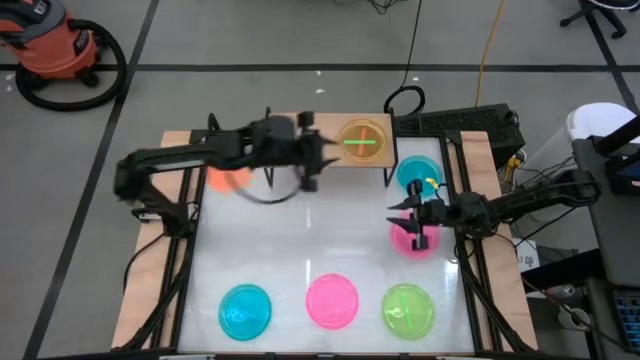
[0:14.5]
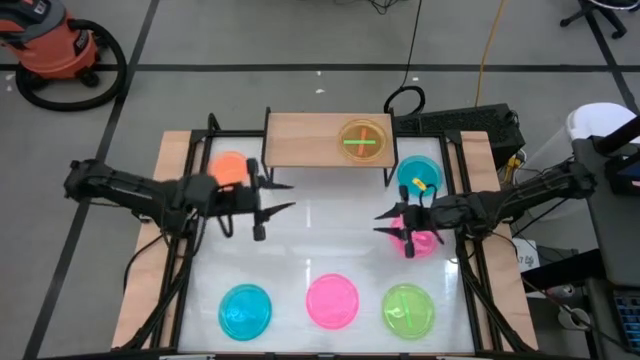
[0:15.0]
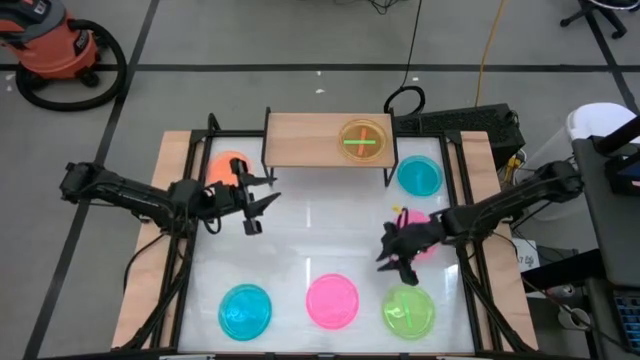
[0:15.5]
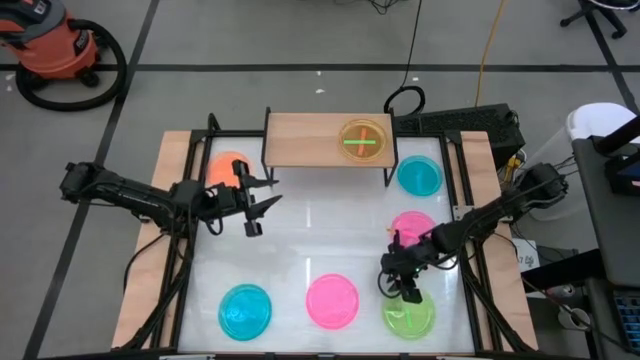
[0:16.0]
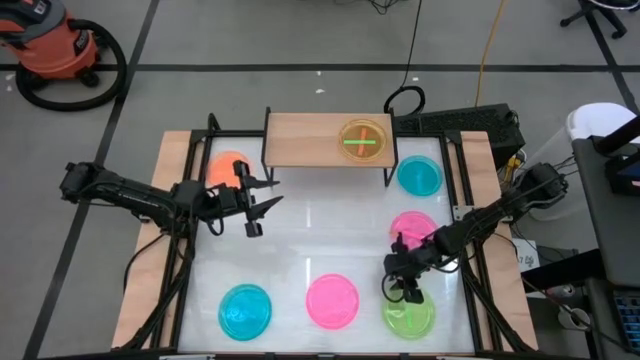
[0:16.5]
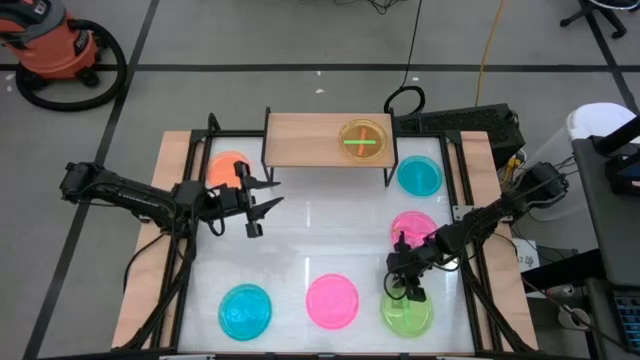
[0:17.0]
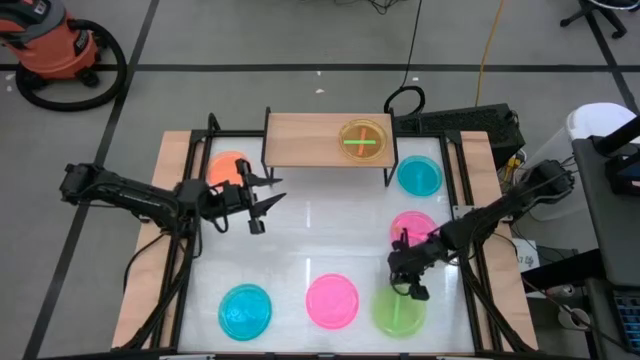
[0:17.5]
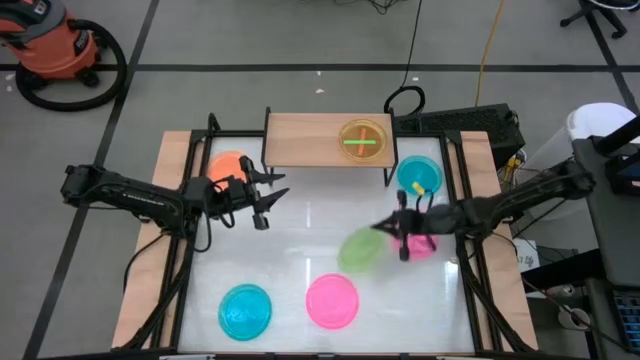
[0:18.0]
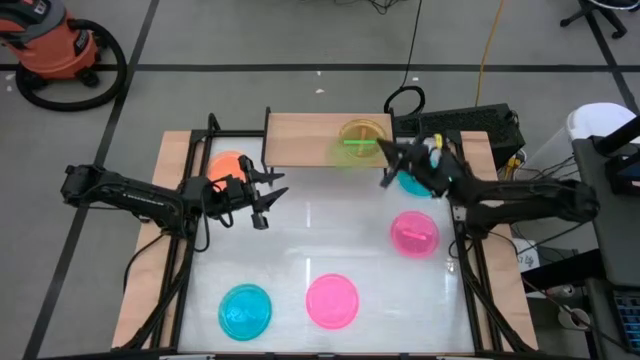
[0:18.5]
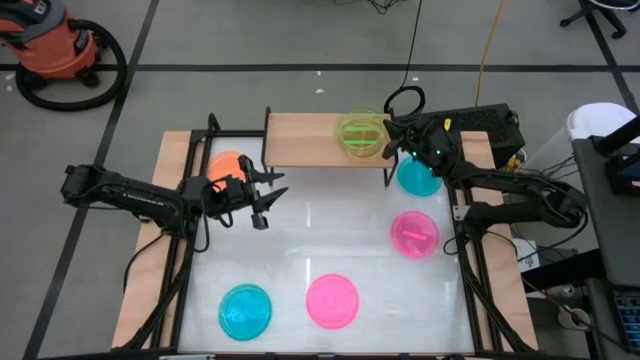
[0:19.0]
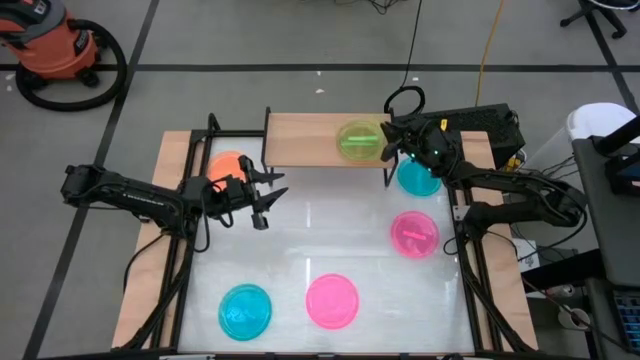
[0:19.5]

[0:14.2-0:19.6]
Task: Place and stack plates onto a shelf
Stack the green plate on top of the green plate on the shelf

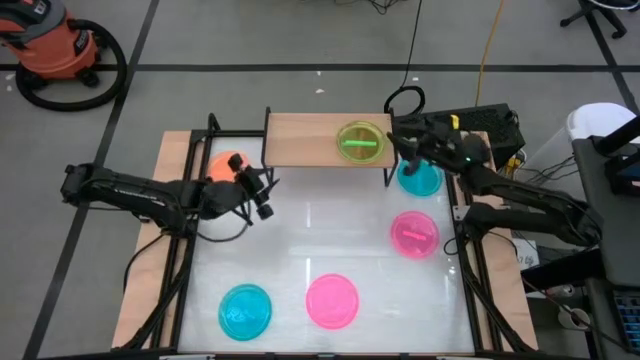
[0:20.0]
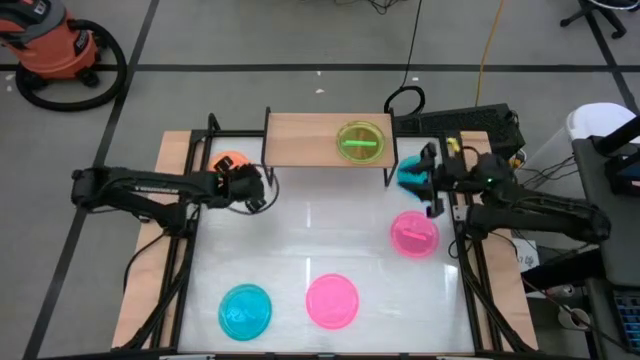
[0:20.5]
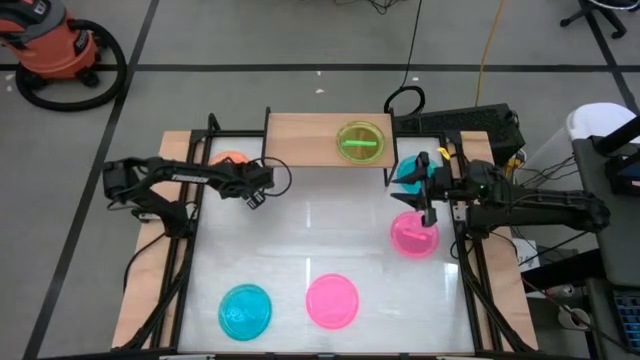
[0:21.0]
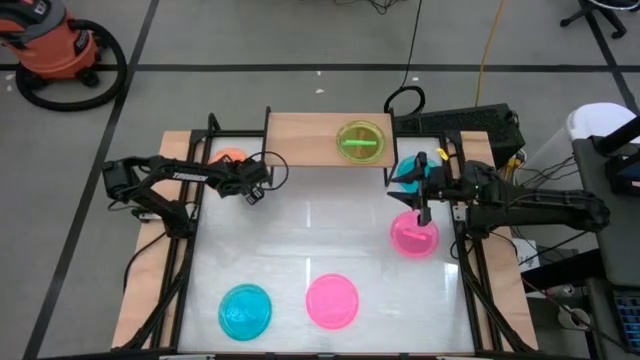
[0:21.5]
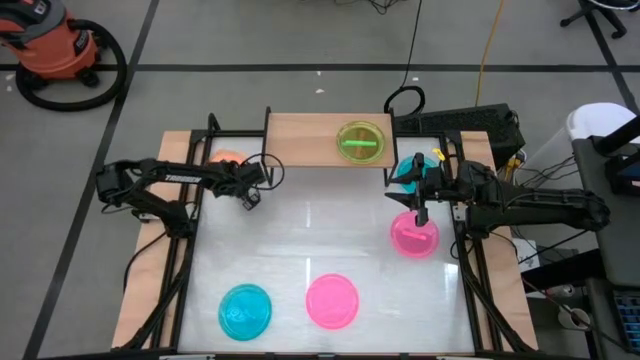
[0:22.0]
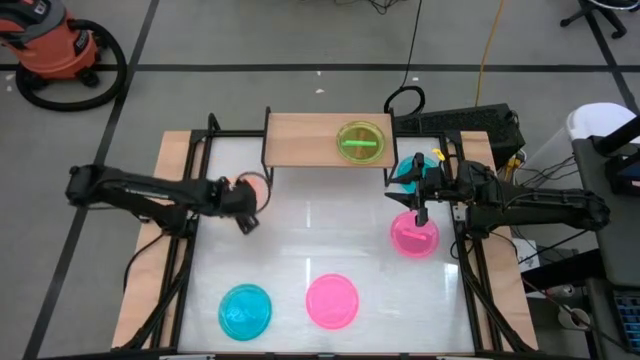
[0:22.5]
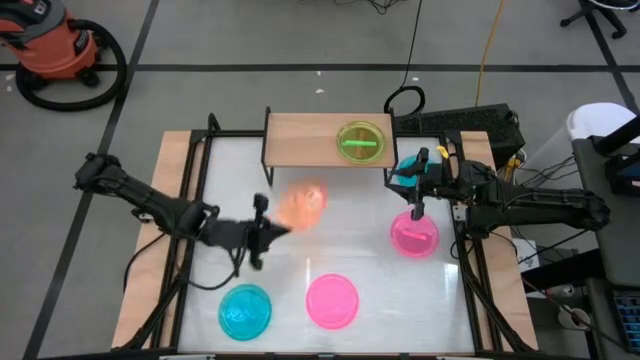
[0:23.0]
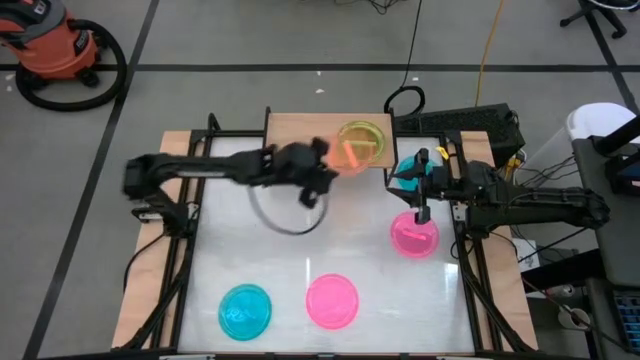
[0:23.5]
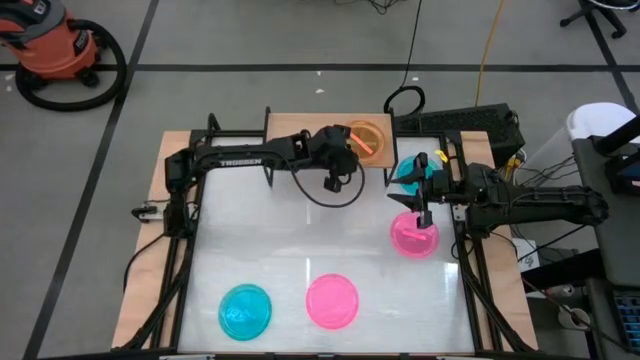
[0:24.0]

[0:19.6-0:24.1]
Stack the orange plate on top of the green plate on the shelf

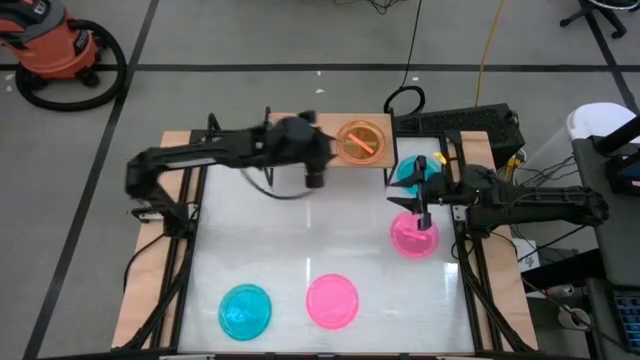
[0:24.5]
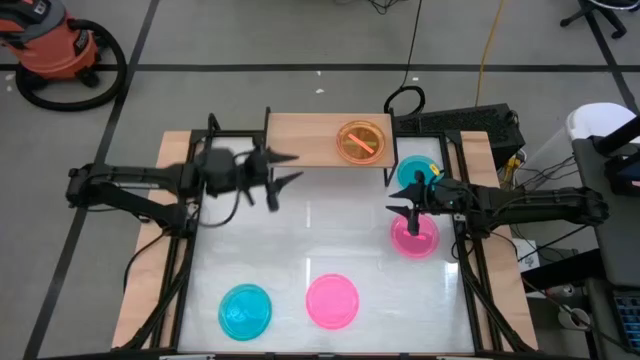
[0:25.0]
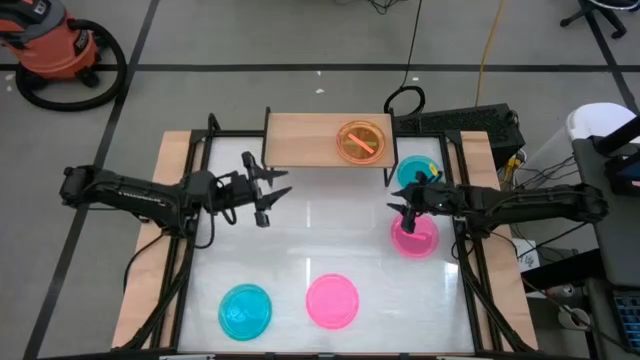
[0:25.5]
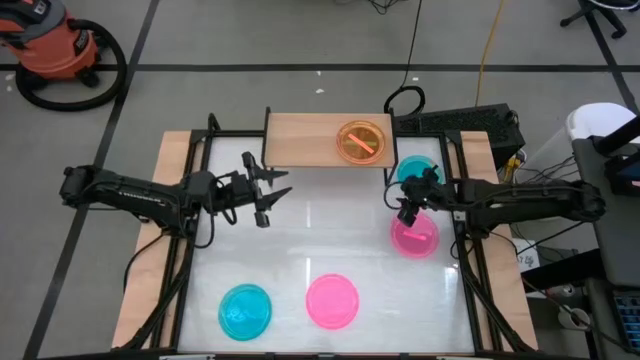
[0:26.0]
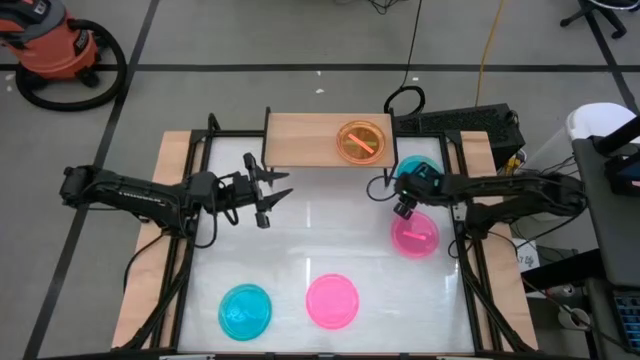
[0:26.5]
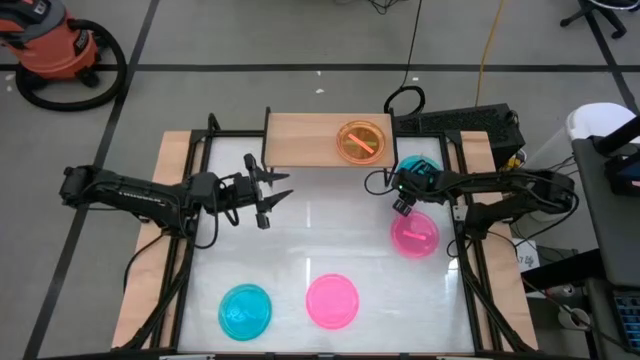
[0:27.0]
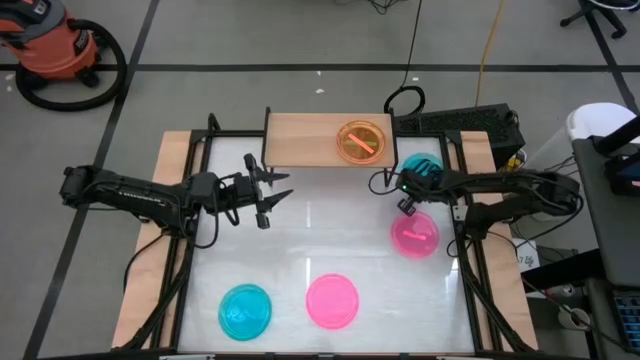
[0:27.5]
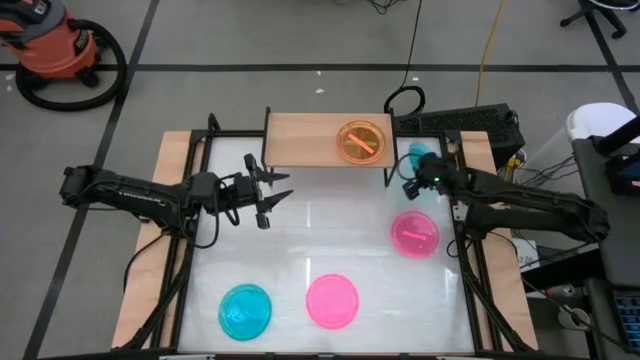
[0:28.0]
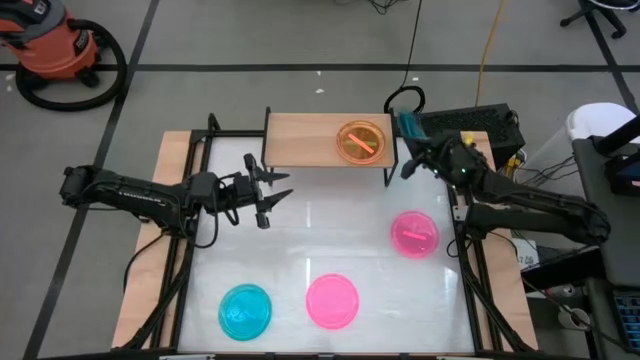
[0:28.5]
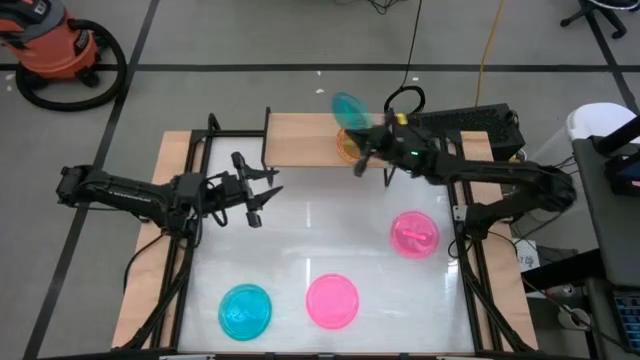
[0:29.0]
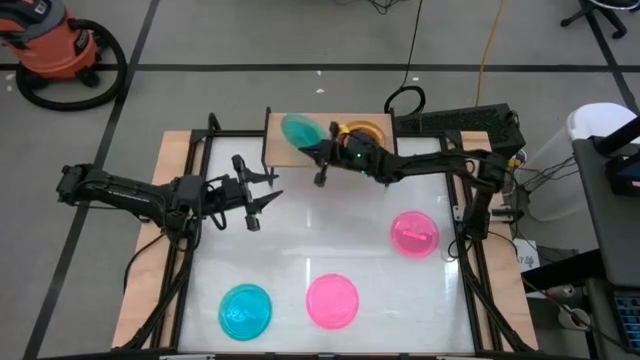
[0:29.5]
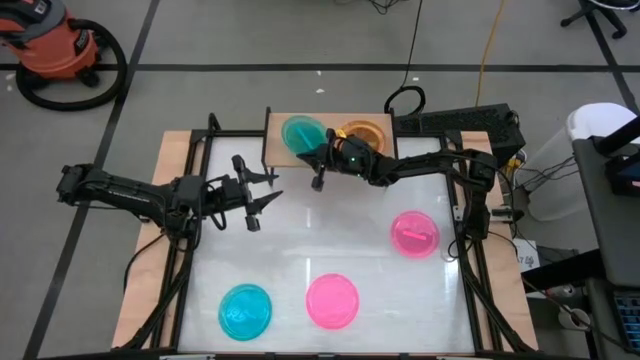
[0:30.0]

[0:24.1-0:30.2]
Put the top blue plate on the shelf

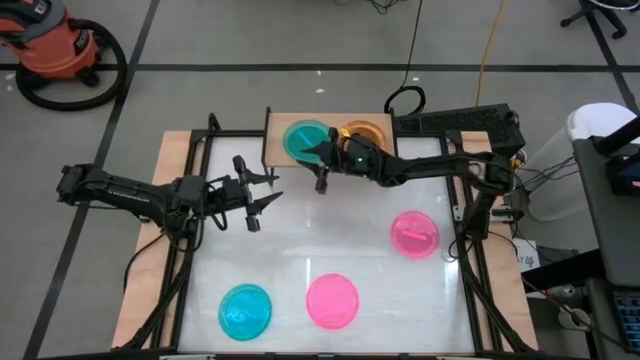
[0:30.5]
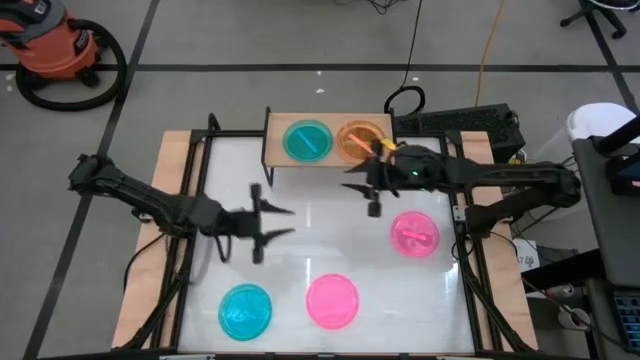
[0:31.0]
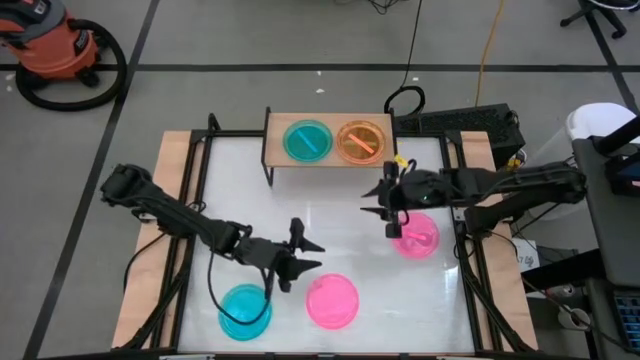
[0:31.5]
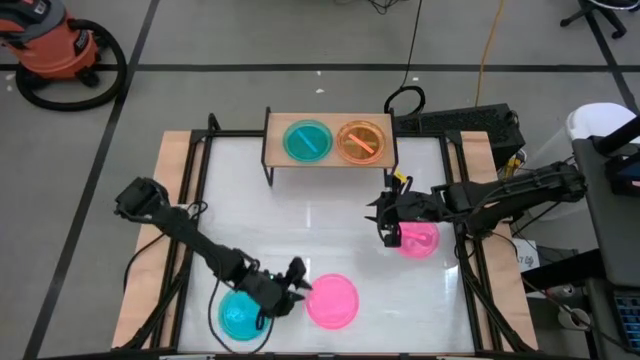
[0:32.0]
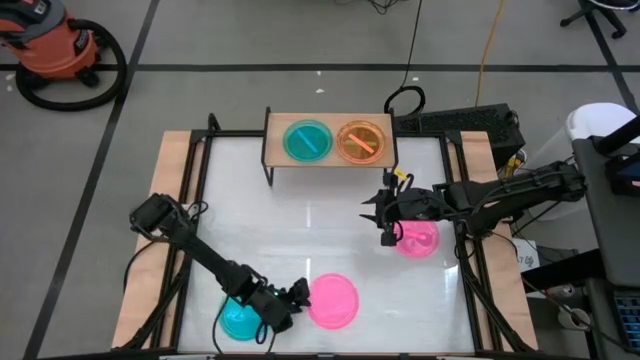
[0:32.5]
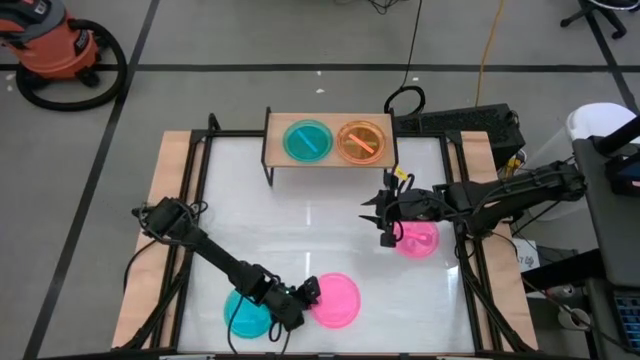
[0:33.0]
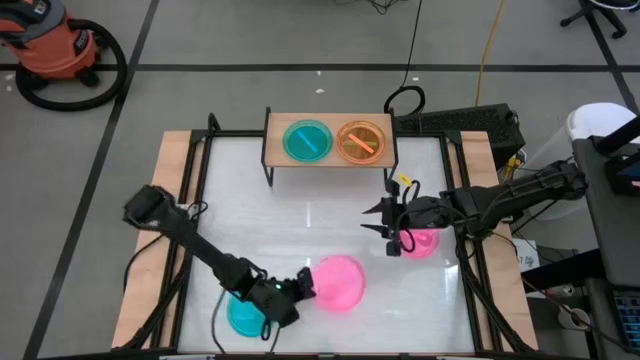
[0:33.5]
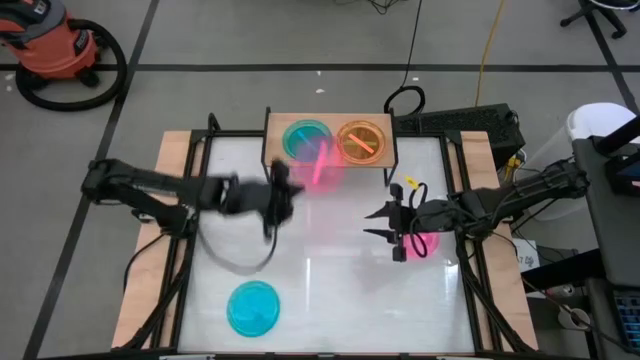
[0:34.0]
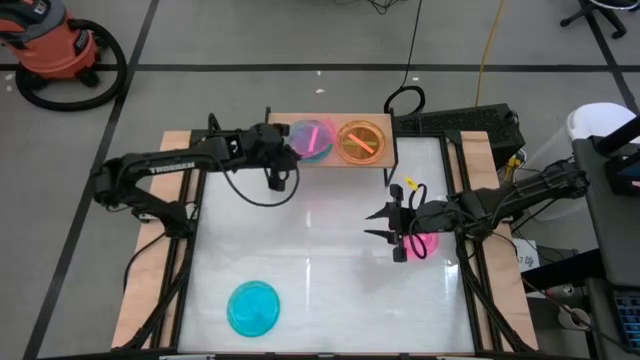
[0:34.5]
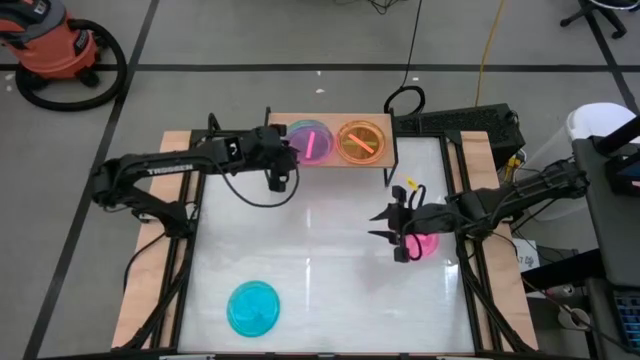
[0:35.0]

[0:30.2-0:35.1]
Stack the bottom pink plate on top of the blue plate on the shelf
